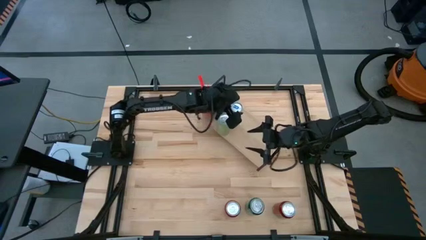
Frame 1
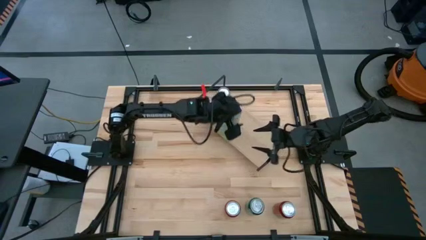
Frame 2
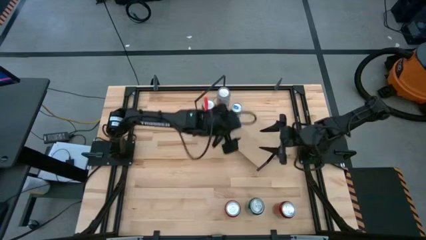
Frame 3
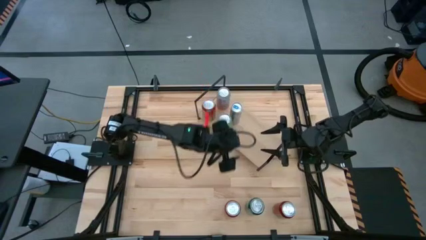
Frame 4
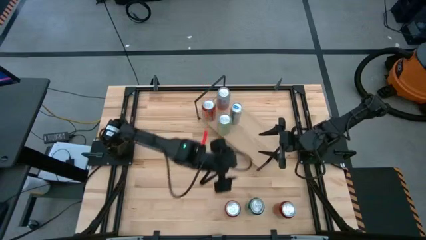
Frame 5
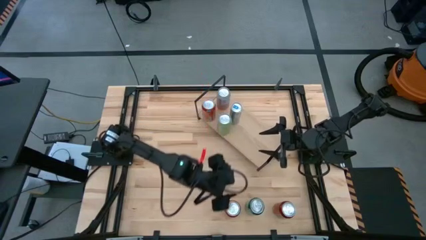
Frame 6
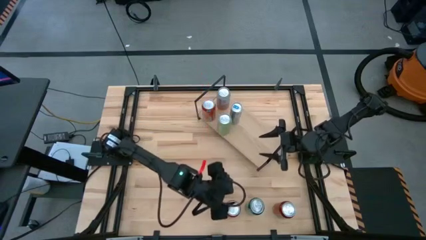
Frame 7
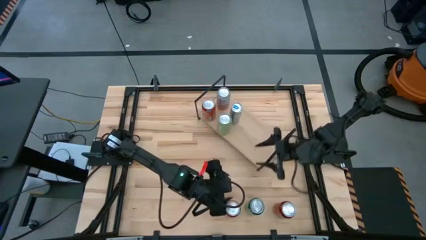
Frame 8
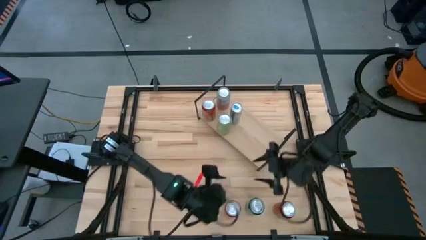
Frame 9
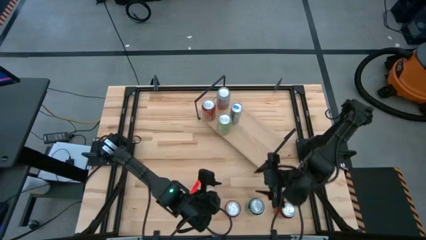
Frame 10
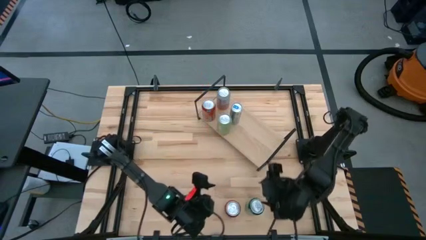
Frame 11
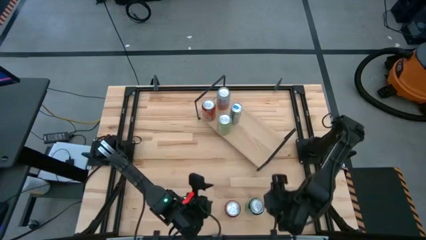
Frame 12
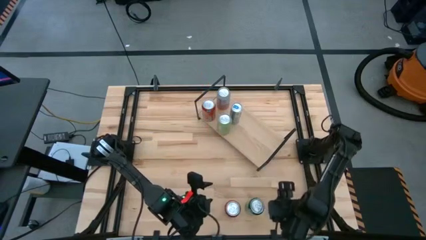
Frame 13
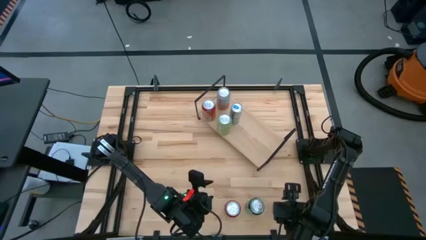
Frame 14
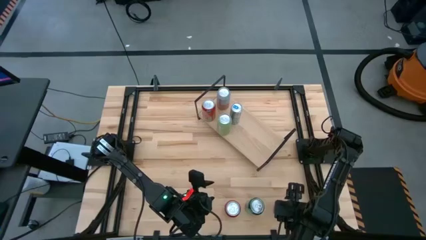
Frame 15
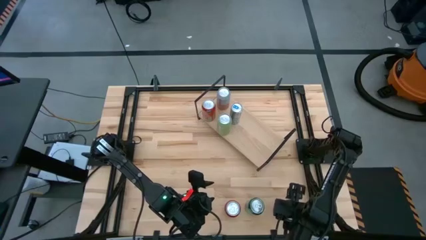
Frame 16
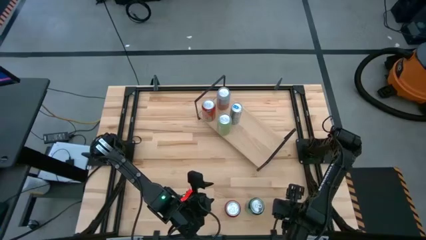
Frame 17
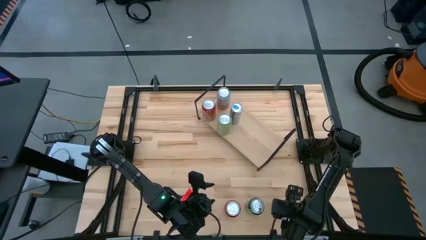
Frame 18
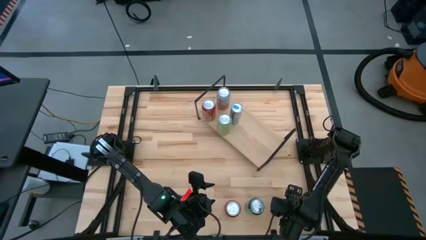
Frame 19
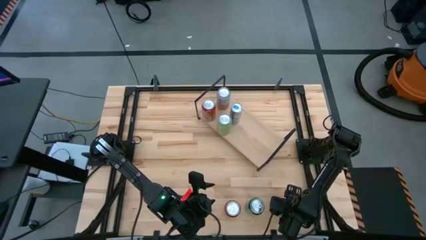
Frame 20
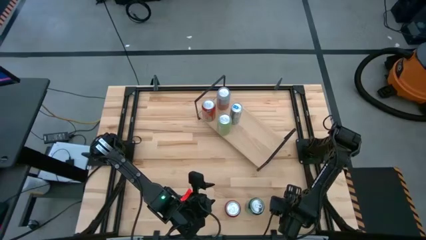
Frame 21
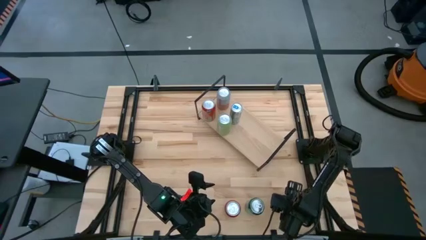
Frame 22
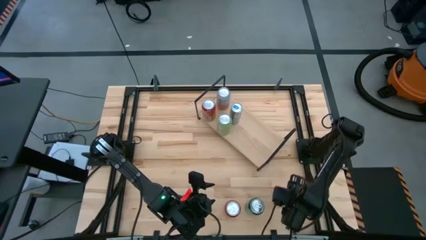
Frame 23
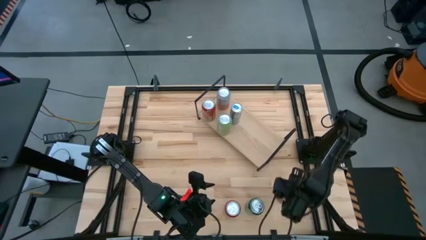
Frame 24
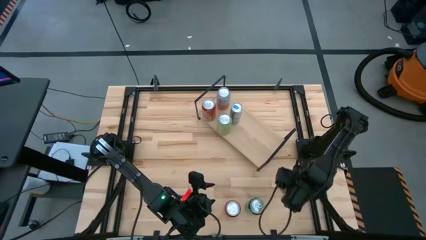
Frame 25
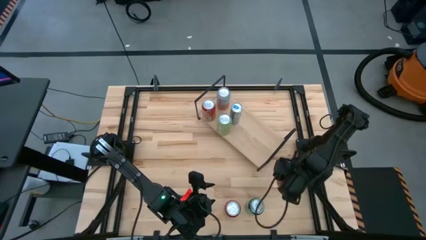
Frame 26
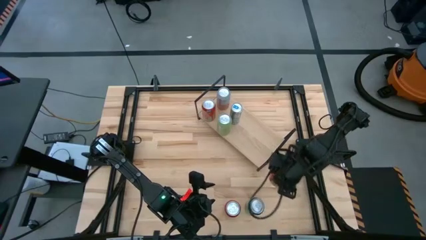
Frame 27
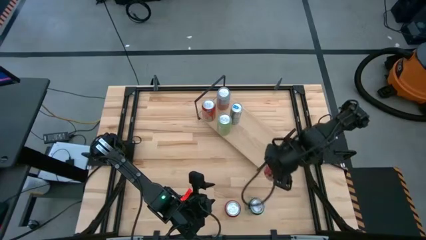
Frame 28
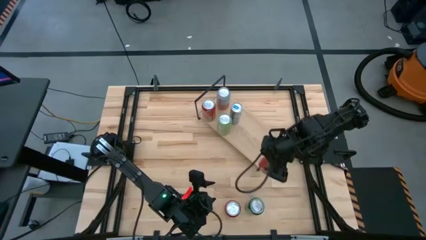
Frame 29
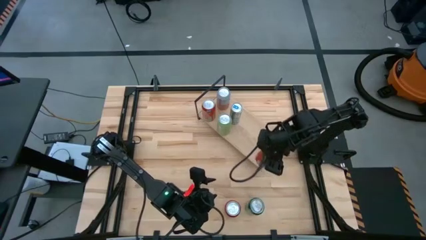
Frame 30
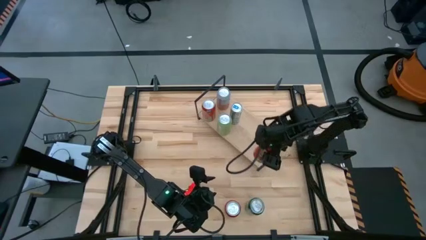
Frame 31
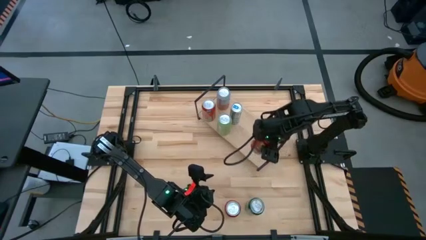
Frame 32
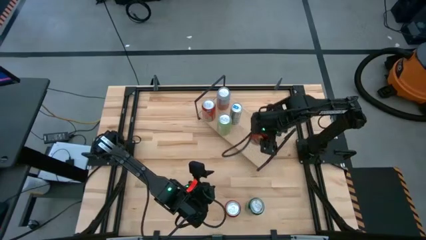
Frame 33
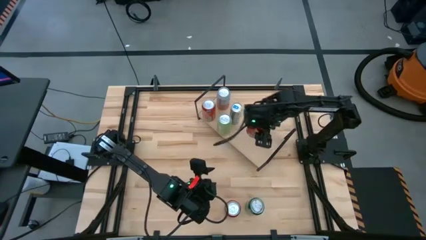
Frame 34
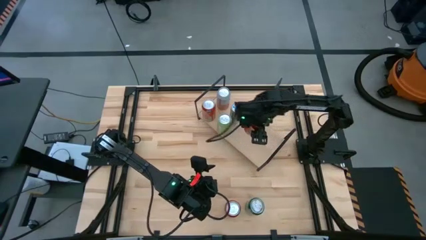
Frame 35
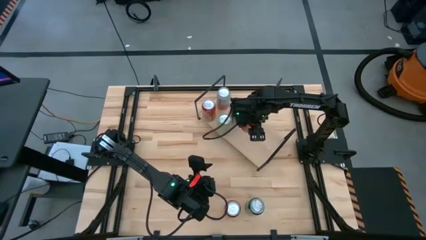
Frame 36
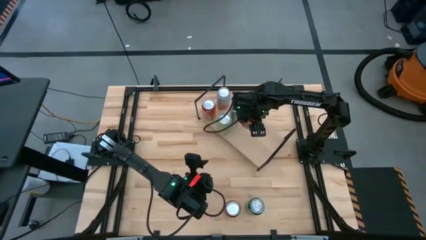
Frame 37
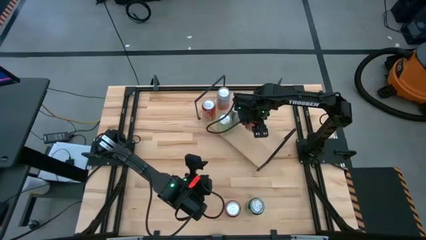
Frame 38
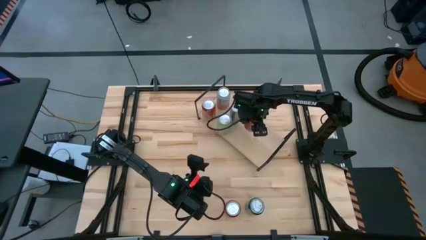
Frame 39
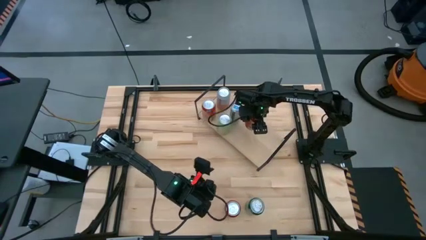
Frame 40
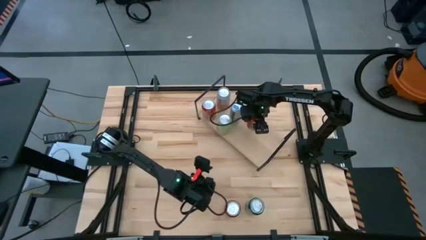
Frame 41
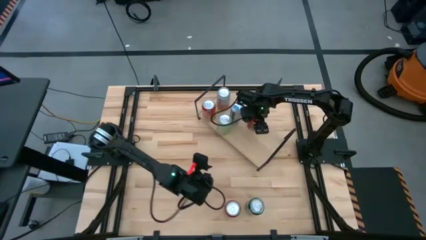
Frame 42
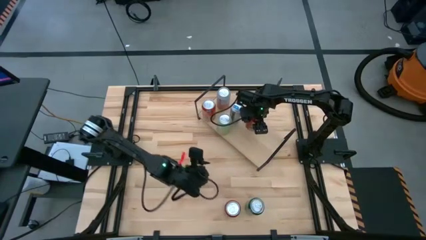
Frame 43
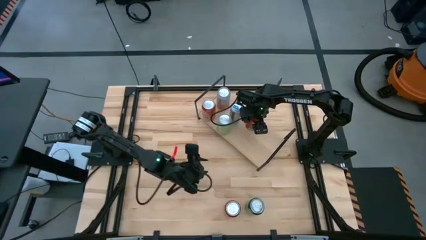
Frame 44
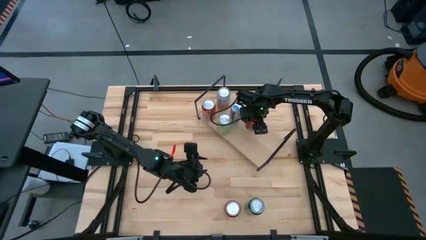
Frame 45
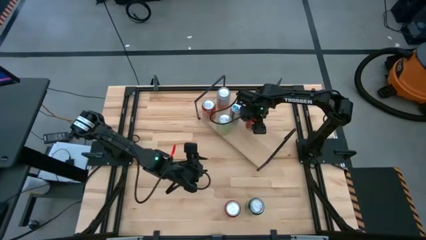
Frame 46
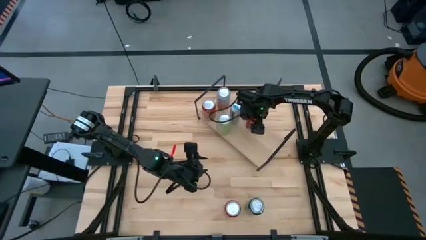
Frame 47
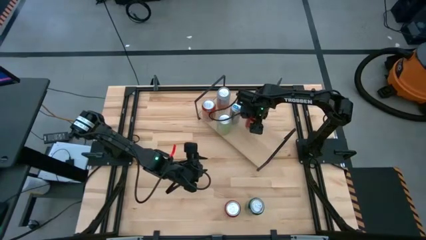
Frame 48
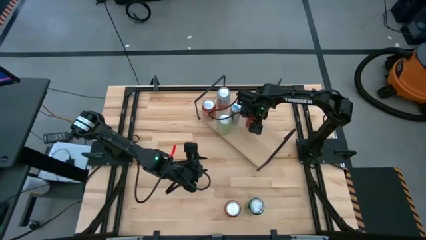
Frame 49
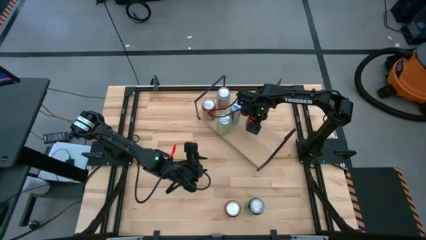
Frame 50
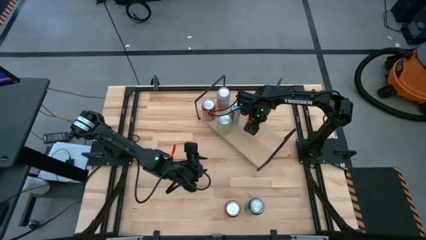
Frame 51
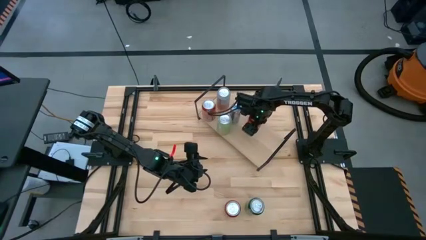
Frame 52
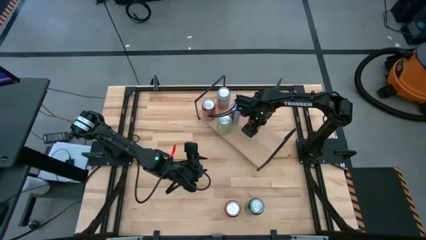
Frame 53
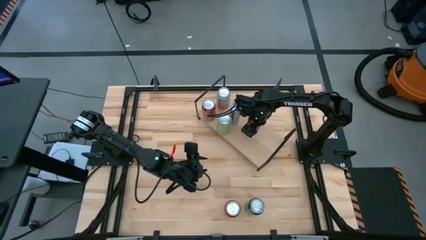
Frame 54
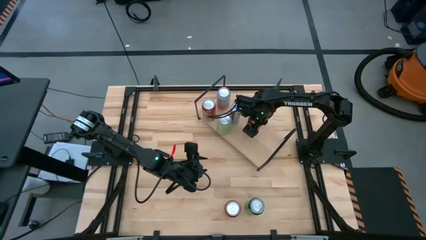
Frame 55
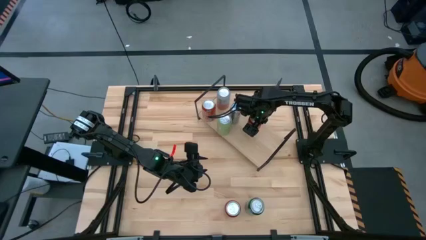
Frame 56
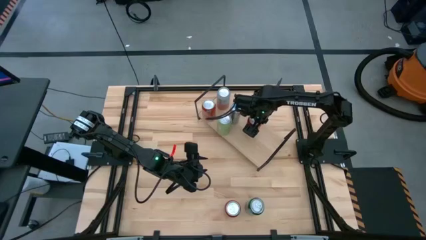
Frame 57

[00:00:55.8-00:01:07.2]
Task: Place canned beverage on shelf
Put the red soda can on the shelf

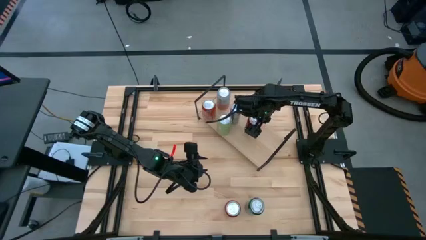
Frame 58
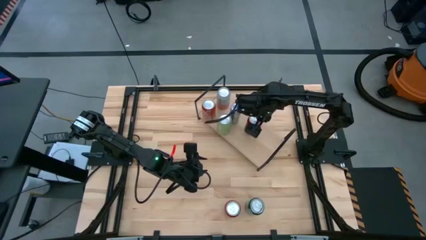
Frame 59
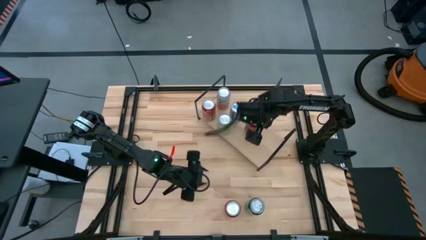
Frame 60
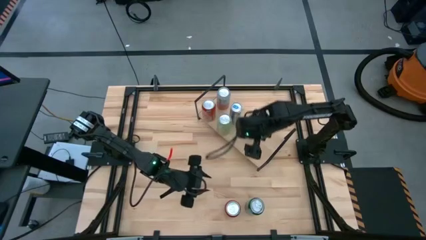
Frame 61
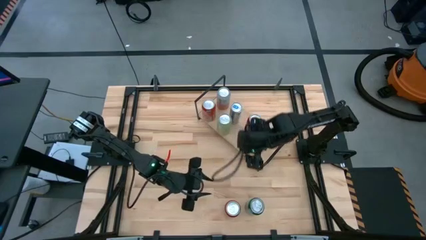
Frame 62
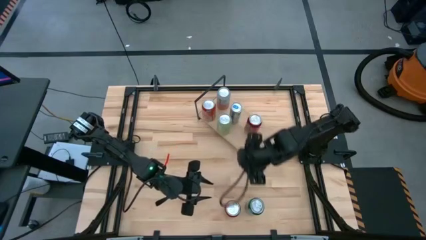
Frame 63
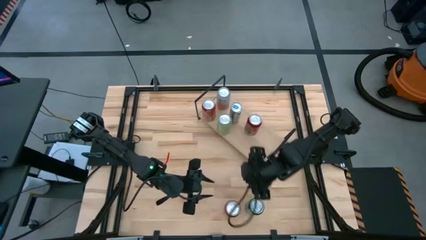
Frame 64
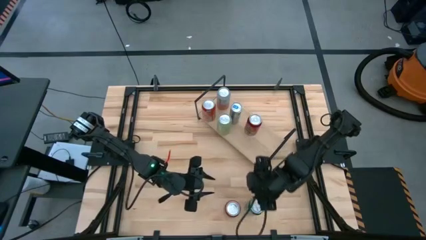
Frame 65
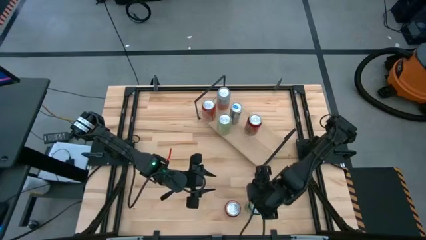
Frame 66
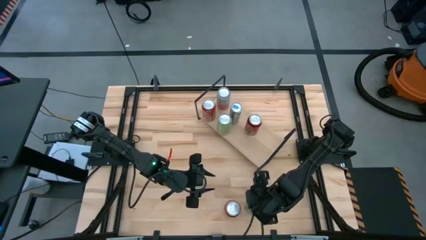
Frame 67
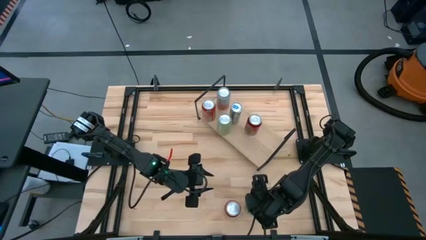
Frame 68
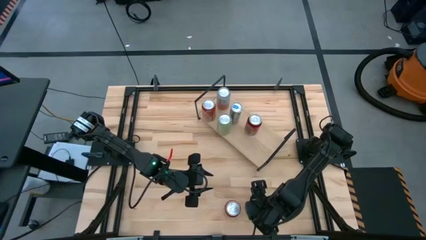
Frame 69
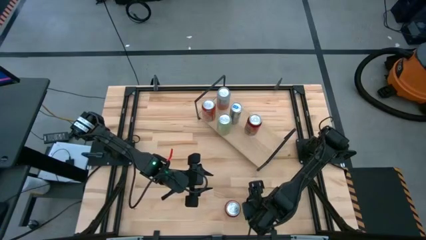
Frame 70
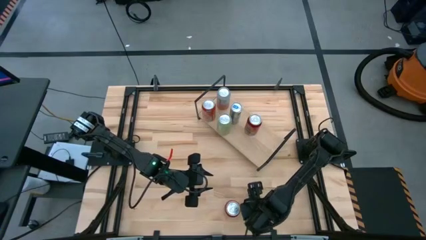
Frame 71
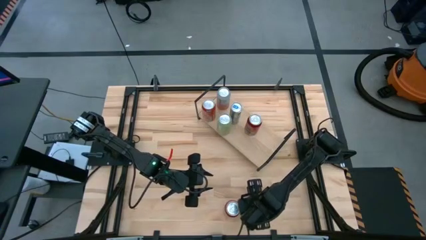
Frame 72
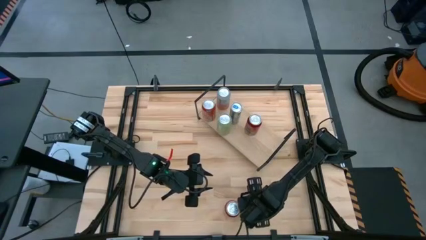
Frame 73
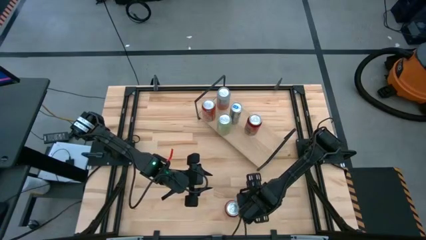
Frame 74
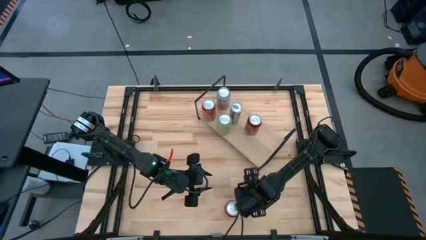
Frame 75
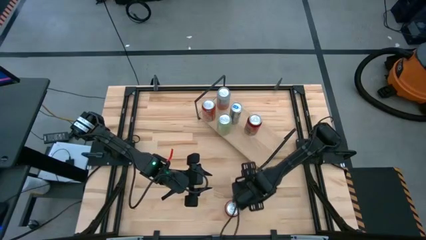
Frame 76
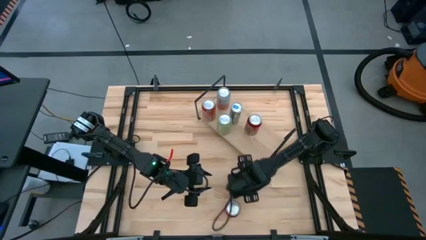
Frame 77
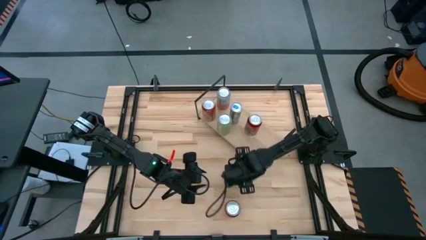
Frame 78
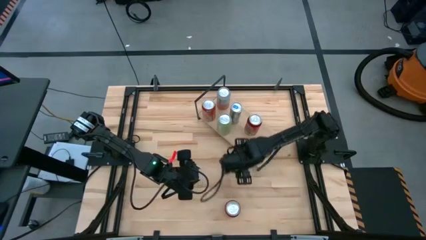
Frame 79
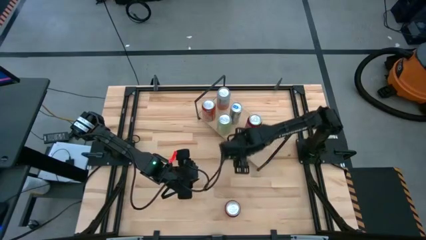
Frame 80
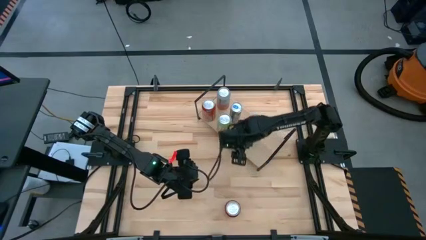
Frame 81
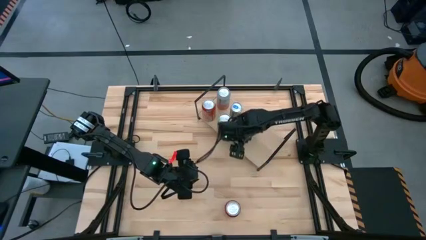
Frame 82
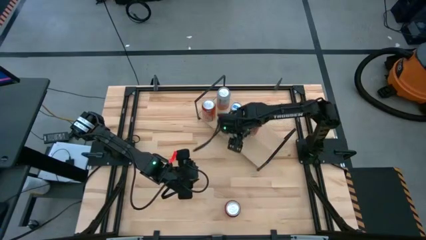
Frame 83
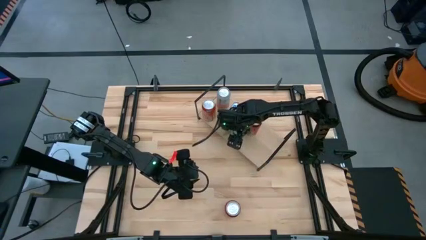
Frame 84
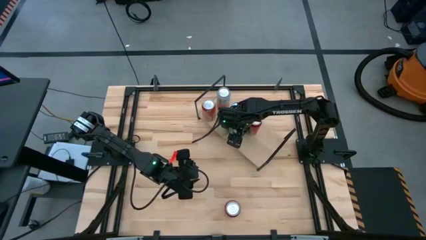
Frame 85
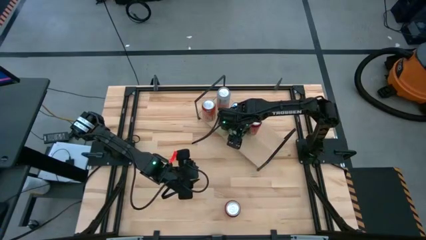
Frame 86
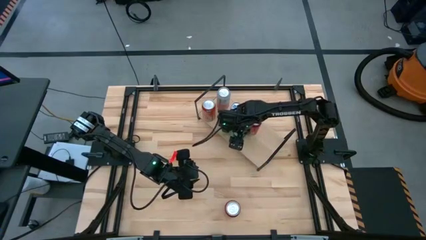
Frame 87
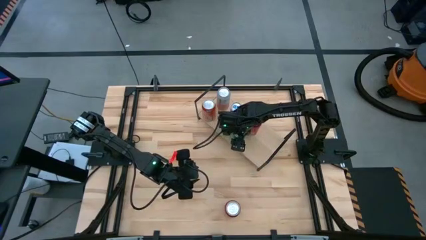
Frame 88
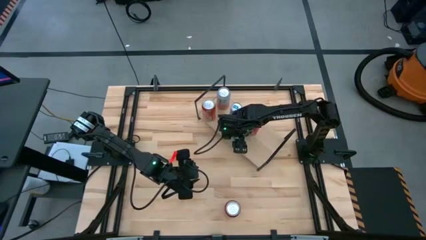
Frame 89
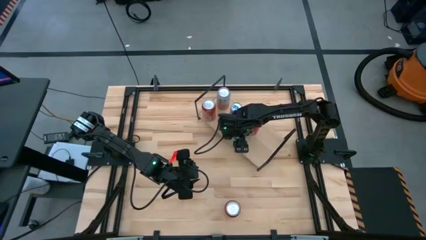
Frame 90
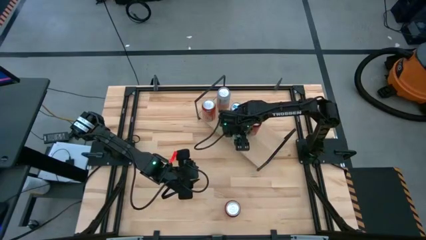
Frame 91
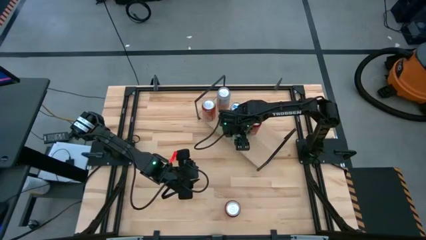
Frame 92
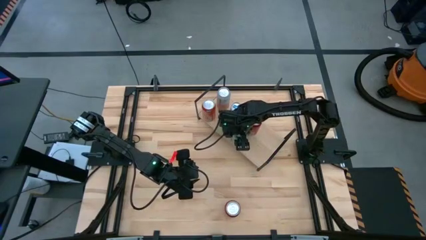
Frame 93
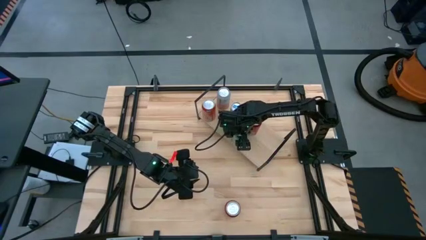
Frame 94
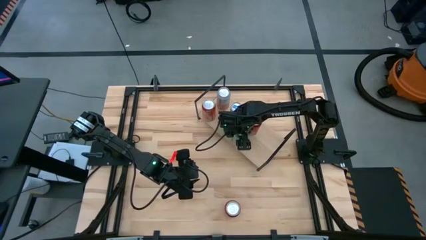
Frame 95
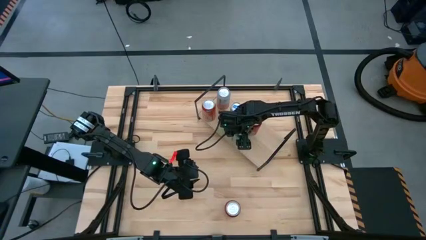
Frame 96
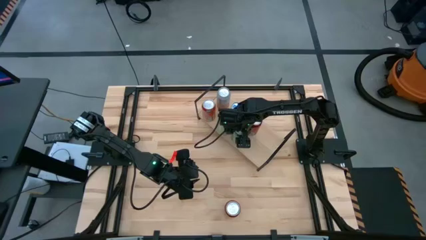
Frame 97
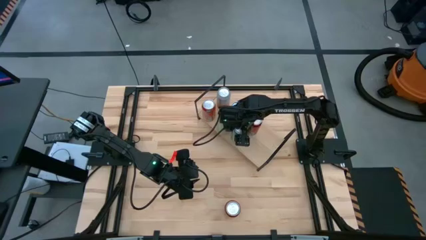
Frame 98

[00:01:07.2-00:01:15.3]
Put the green soda can on the shelf
